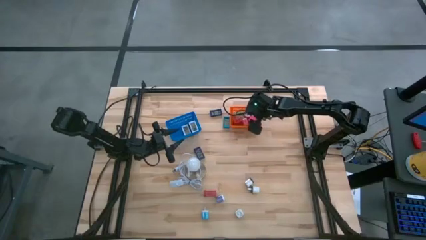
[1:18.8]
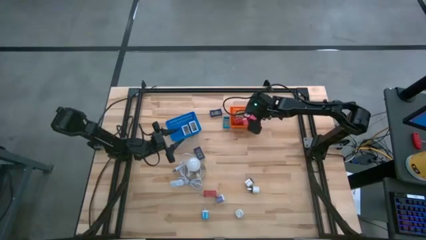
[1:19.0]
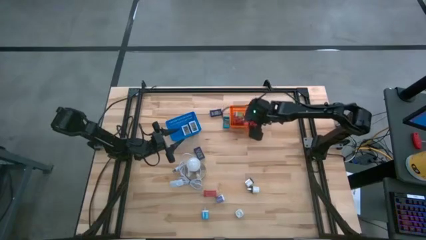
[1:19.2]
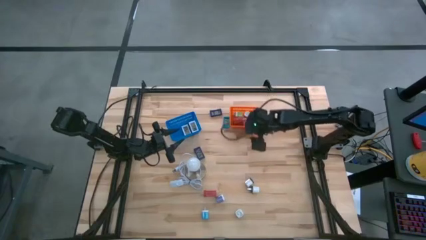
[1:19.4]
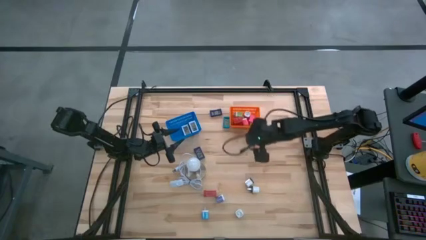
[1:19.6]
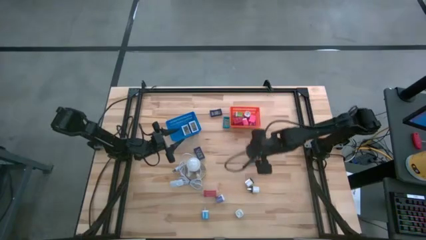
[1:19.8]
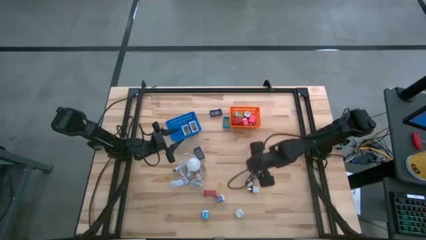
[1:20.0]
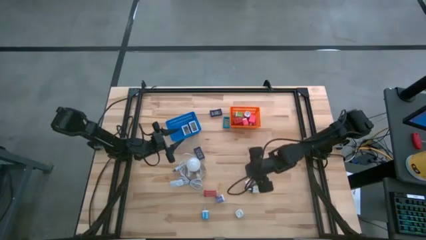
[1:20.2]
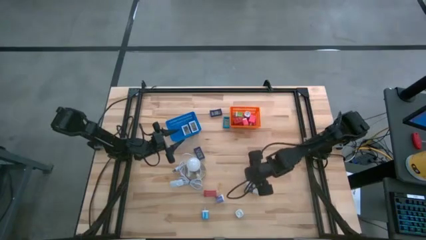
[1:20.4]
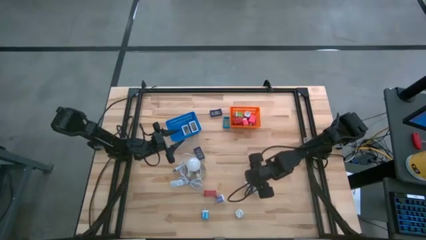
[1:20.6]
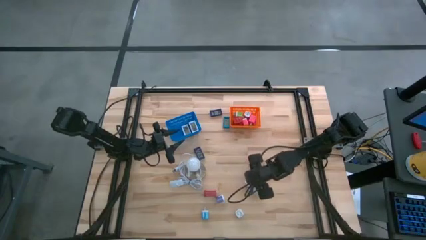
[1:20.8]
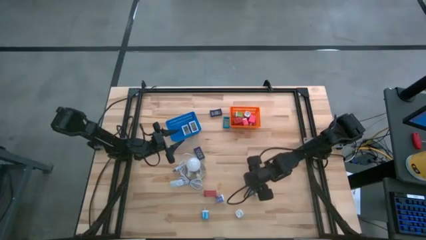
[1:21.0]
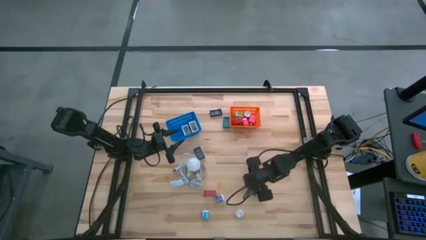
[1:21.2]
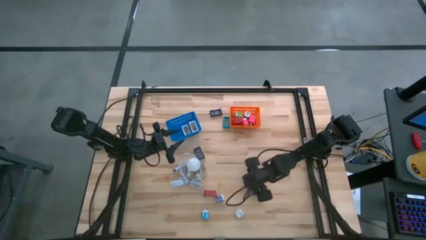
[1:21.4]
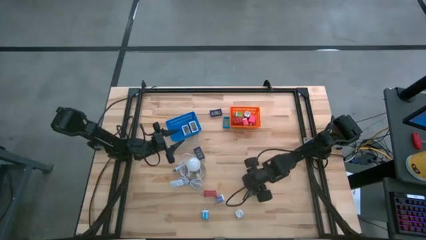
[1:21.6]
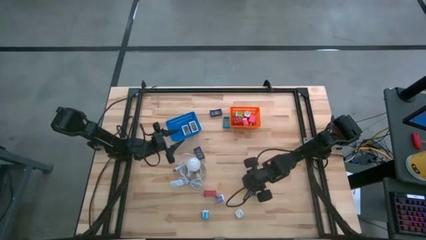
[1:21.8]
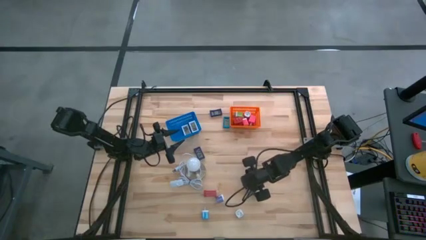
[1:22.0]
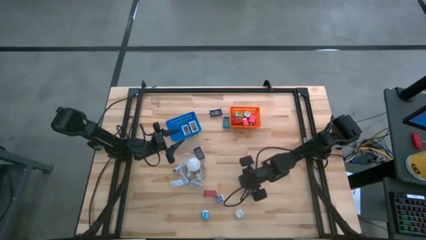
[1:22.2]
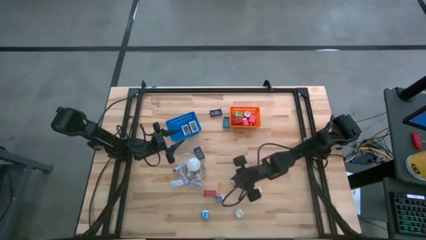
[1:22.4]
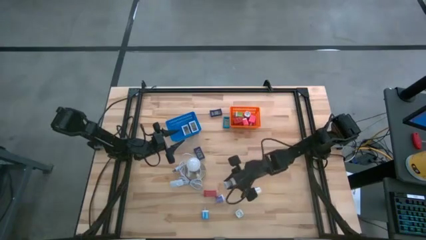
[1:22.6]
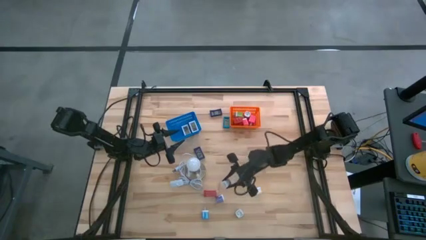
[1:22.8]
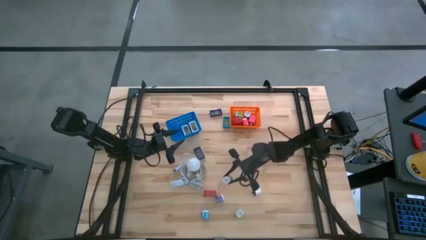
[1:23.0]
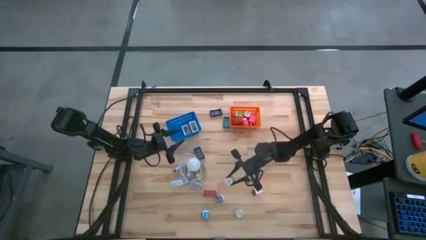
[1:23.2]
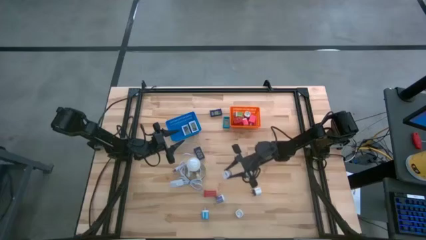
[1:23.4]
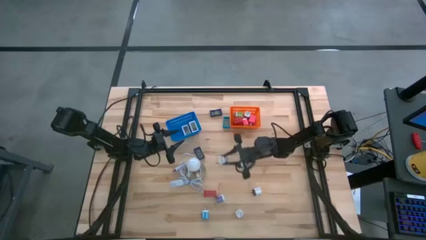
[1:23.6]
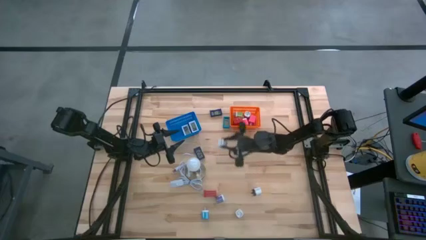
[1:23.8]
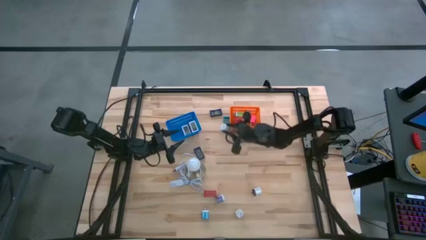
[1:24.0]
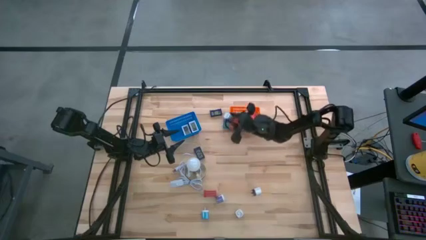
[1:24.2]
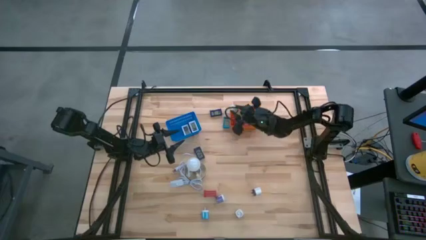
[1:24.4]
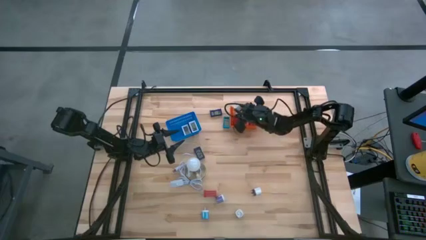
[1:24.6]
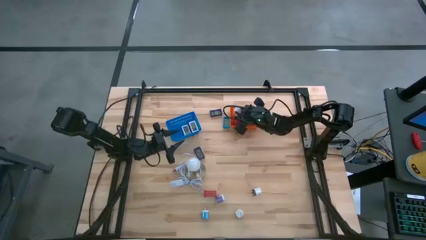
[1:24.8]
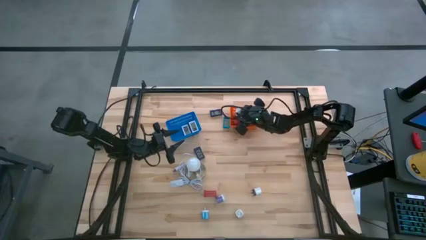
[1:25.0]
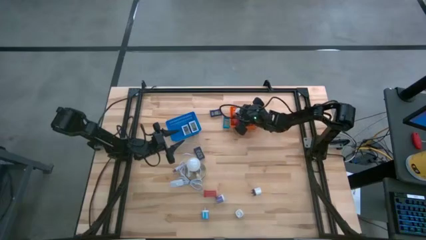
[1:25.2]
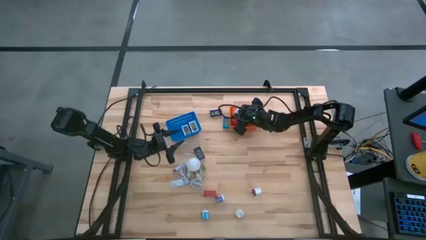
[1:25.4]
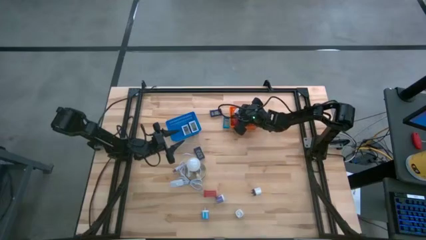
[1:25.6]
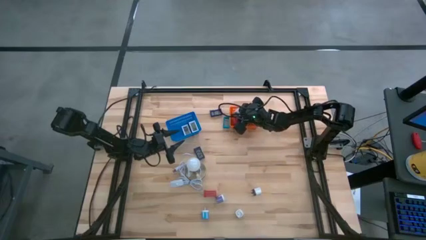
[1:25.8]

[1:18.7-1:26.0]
Task: Pick & Place Office items
Put the top white charger adapter into the orange bin

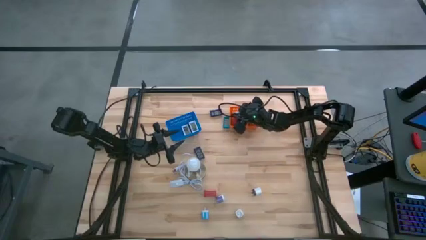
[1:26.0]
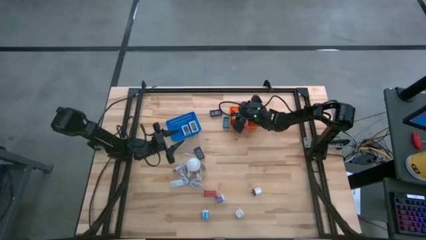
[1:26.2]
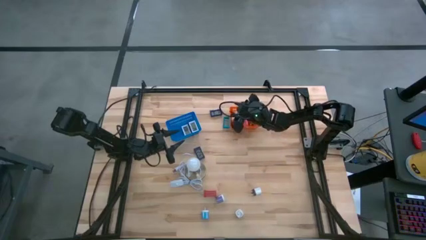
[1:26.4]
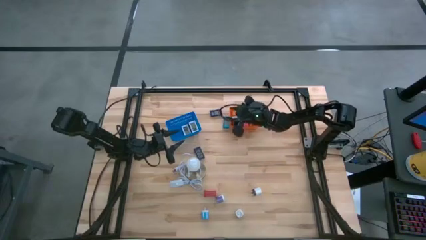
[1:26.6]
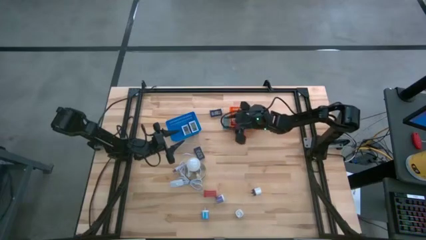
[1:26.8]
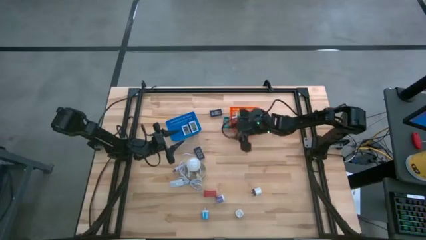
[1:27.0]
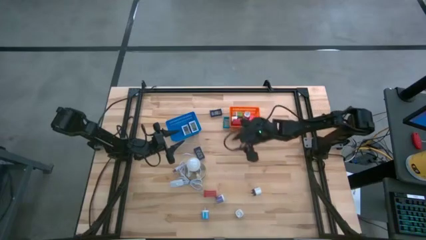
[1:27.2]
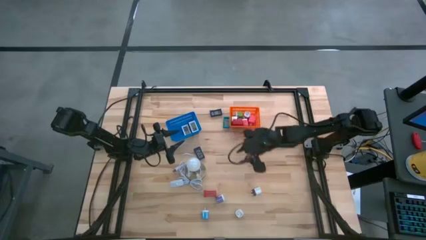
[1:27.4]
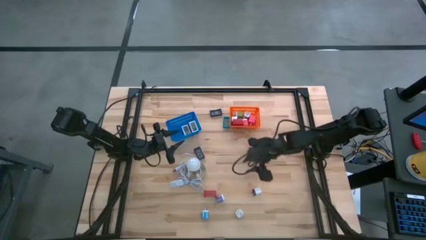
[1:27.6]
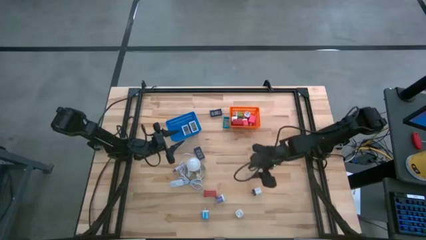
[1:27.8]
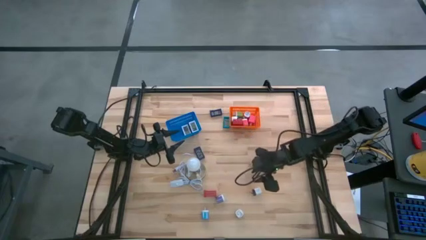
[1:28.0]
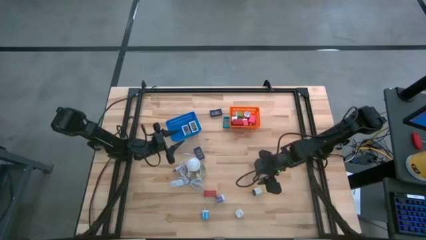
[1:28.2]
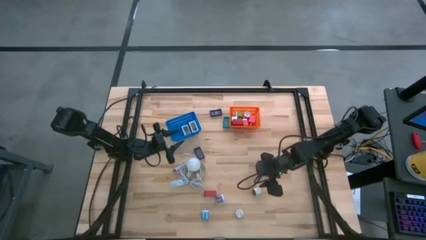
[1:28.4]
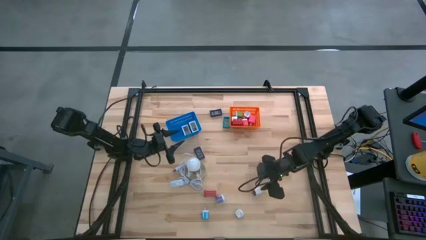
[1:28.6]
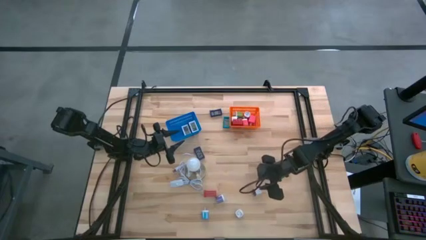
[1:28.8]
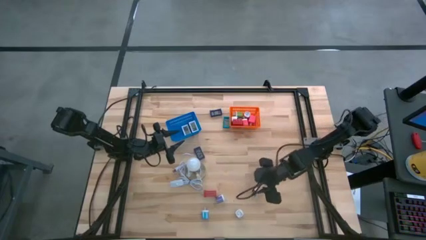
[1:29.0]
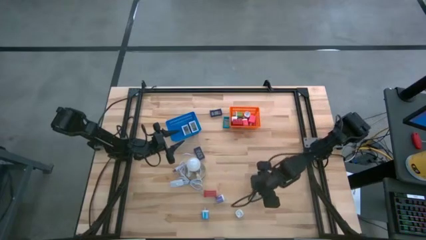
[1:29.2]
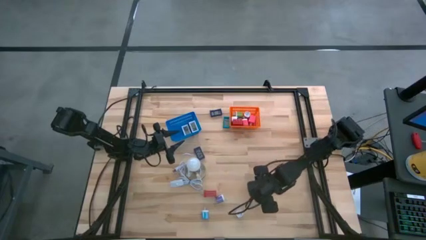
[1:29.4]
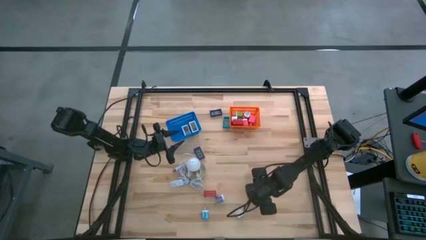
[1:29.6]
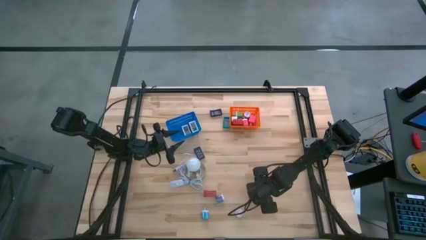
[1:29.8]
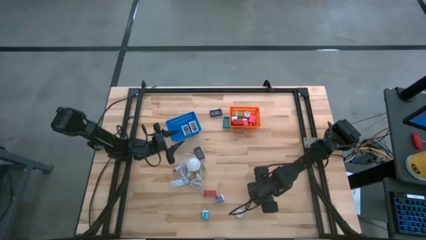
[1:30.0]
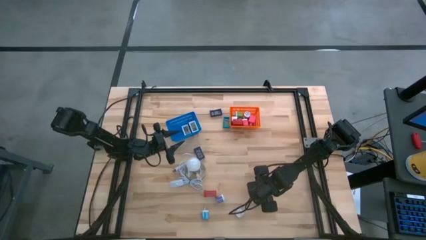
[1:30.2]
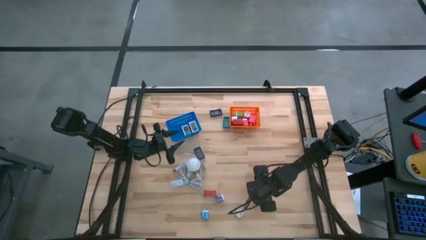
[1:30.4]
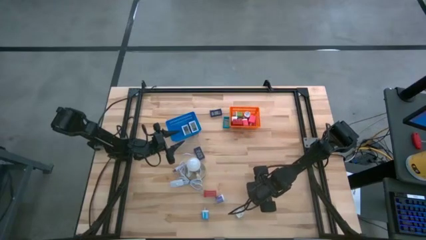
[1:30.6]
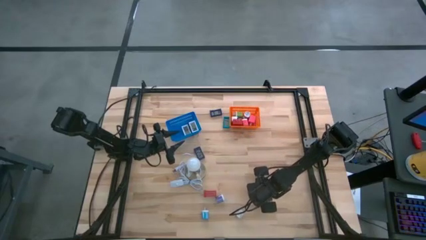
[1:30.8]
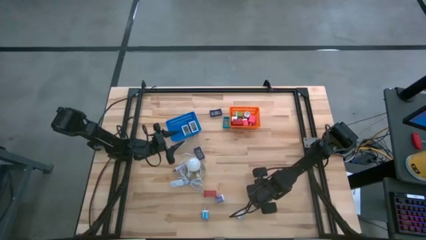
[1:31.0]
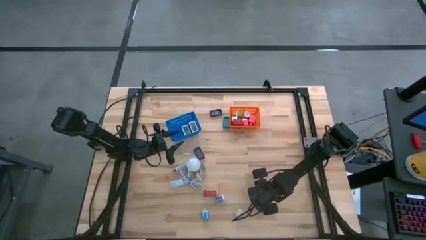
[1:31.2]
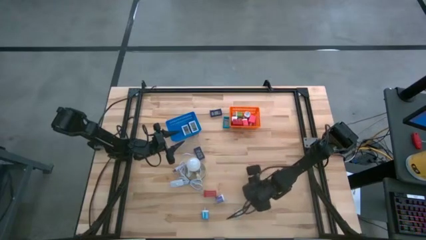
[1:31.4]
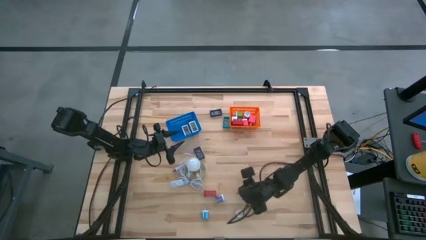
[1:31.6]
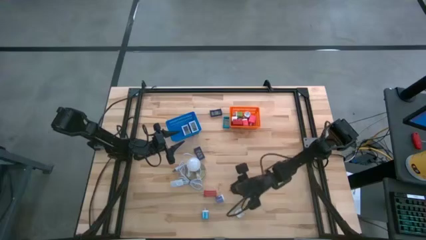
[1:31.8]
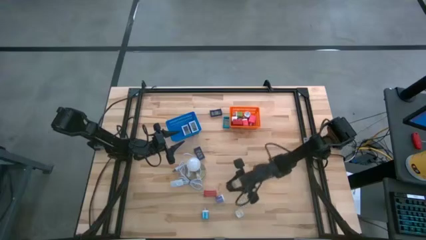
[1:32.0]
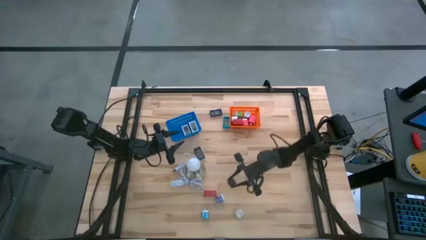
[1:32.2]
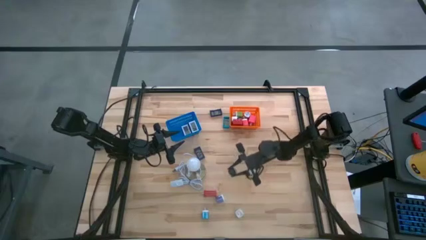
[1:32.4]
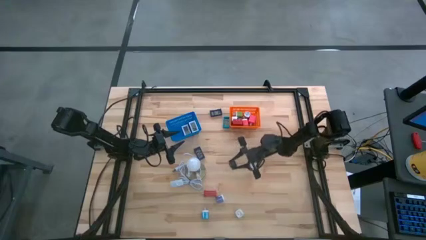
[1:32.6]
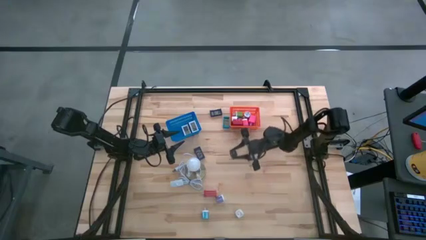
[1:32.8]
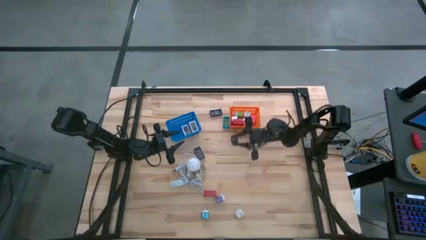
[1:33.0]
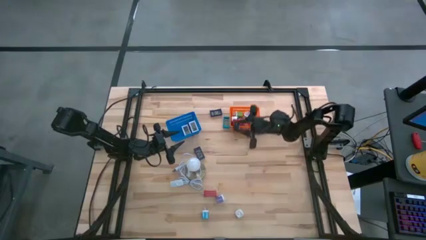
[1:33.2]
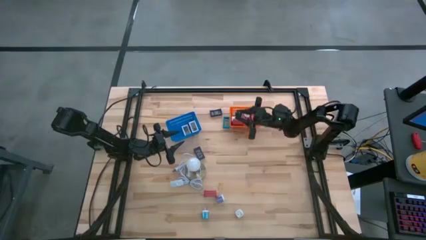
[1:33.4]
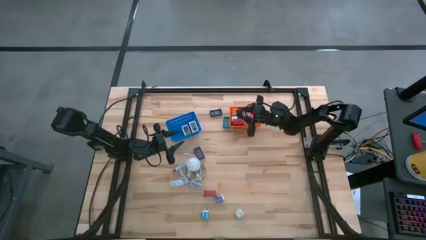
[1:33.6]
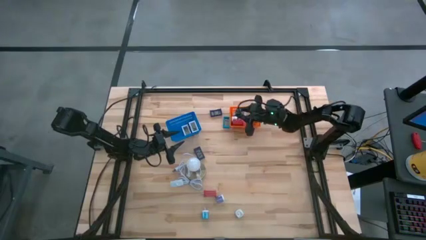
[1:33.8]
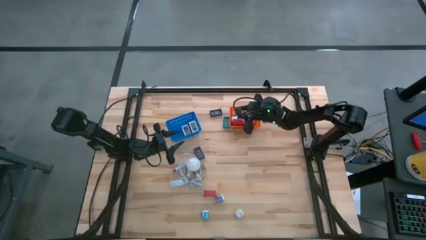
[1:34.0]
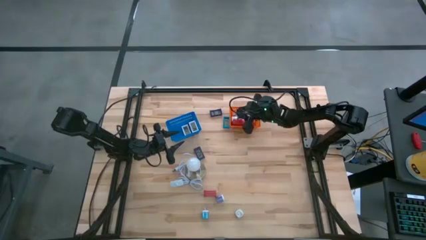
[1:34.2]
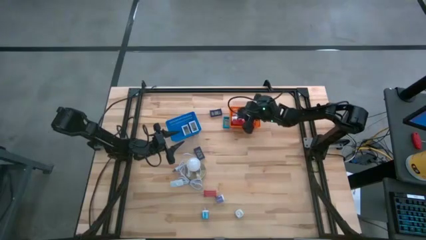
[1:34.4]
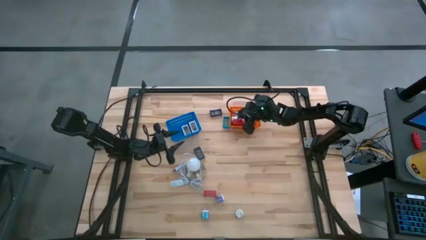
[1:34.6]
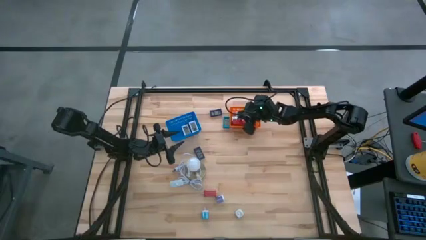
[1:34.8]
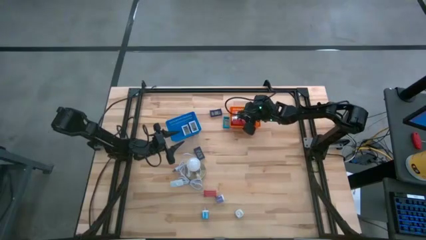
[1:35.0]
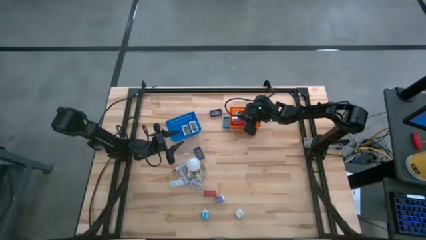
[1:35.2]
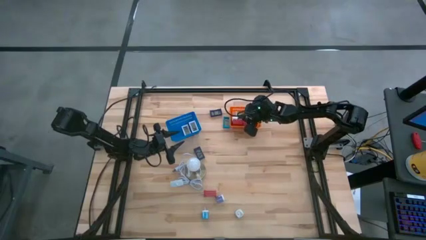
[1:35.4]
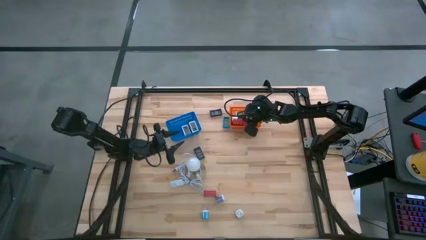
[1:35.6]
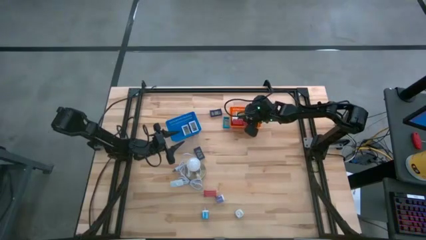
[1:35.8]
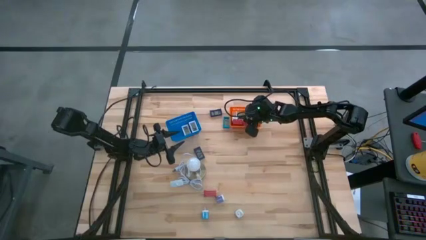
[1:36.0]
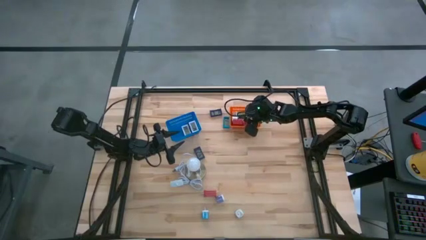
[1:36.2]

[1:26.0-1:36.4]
Put the white charger adapter into the orange bin
